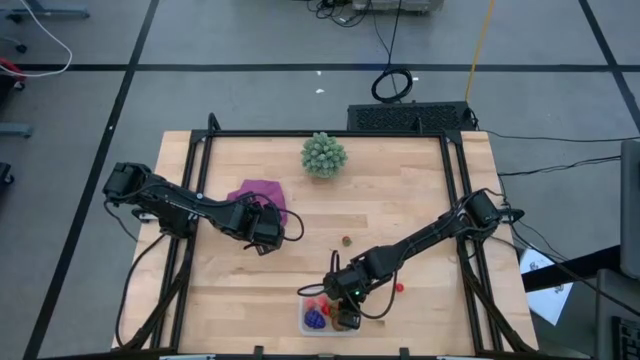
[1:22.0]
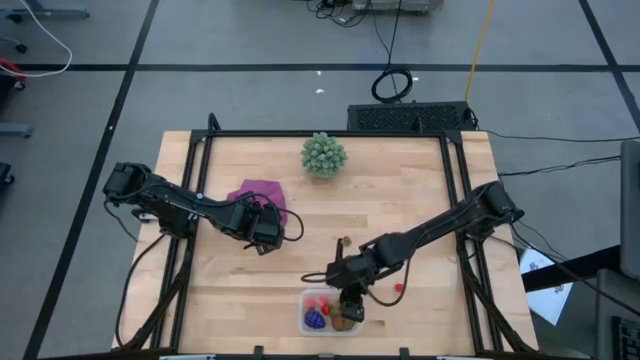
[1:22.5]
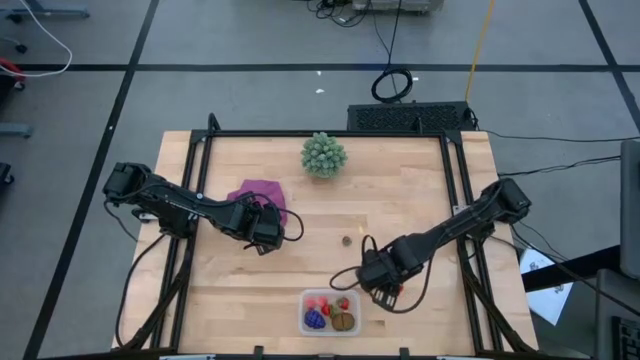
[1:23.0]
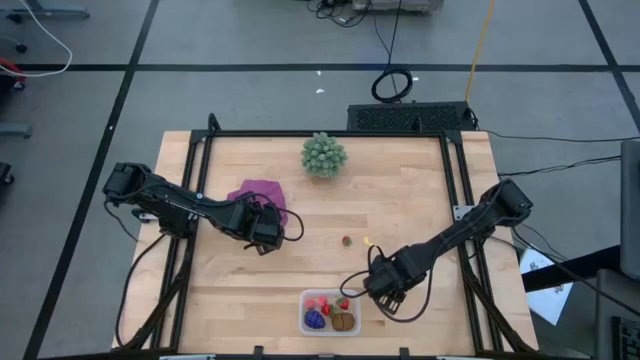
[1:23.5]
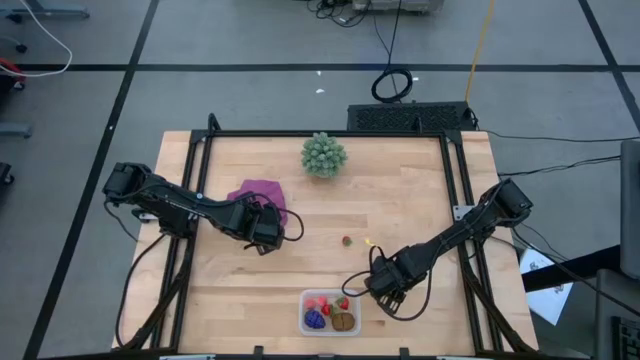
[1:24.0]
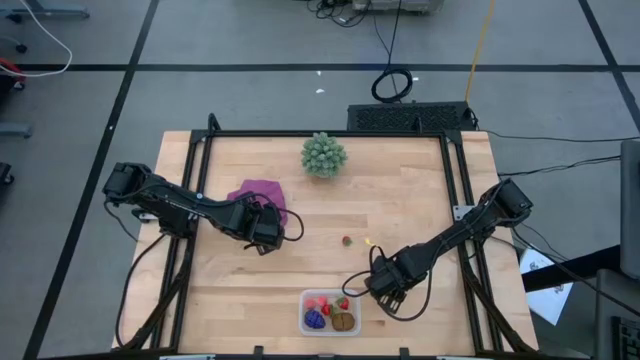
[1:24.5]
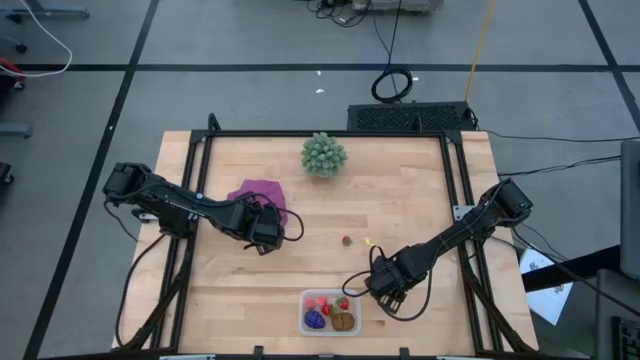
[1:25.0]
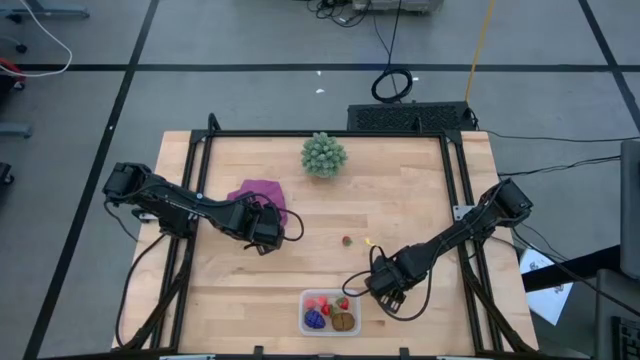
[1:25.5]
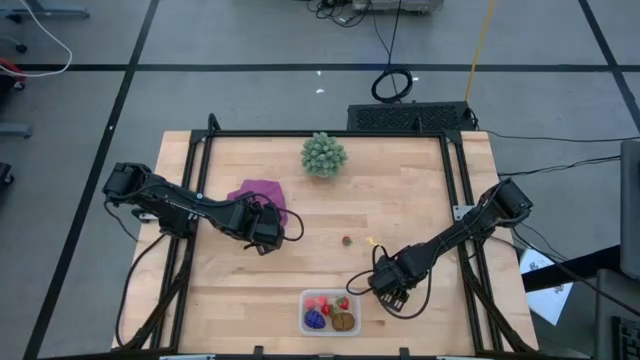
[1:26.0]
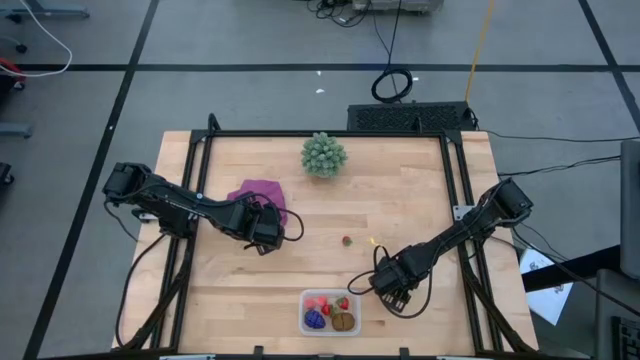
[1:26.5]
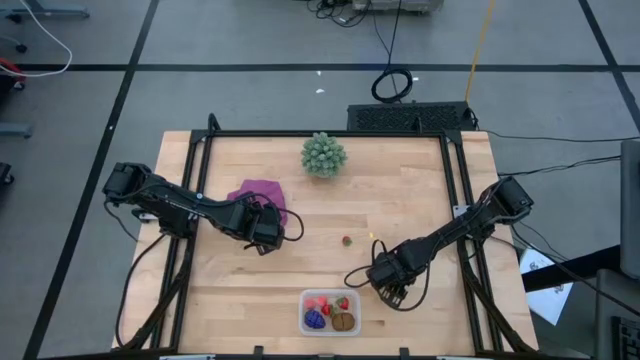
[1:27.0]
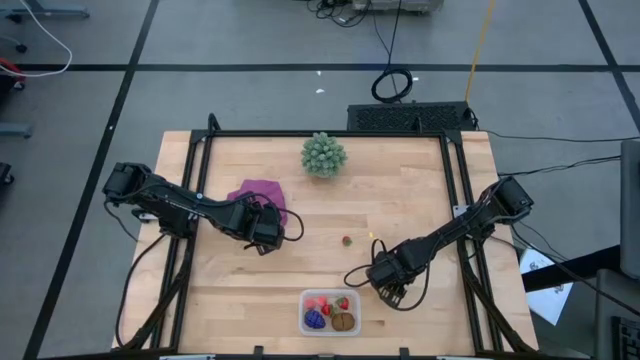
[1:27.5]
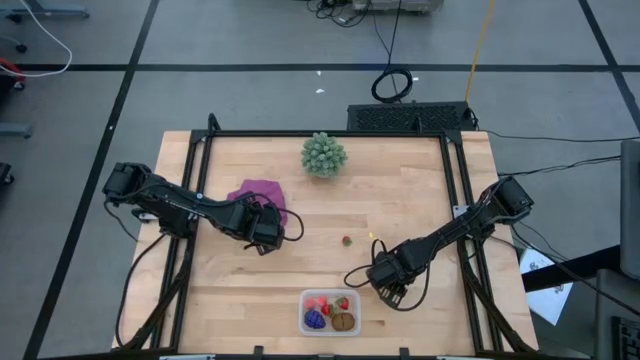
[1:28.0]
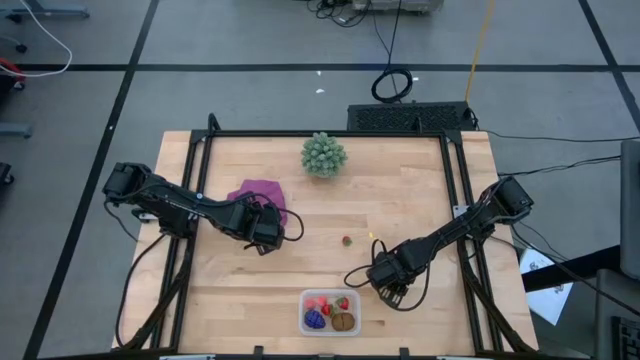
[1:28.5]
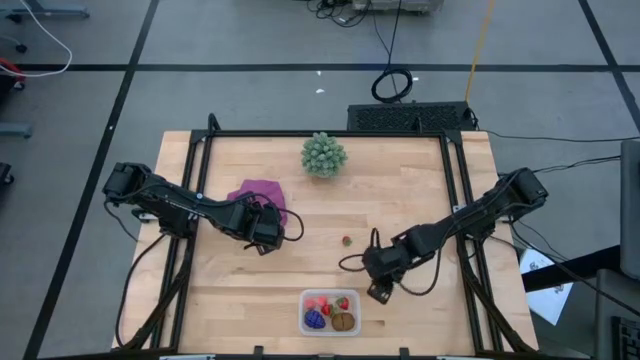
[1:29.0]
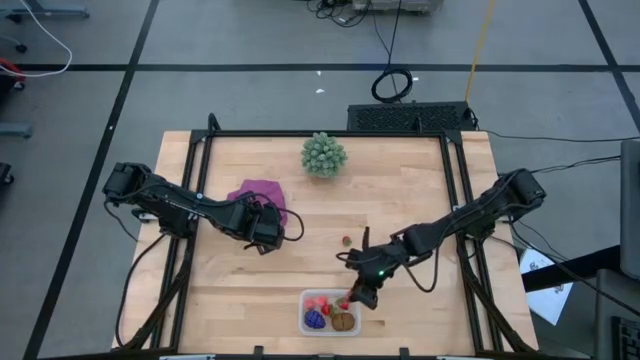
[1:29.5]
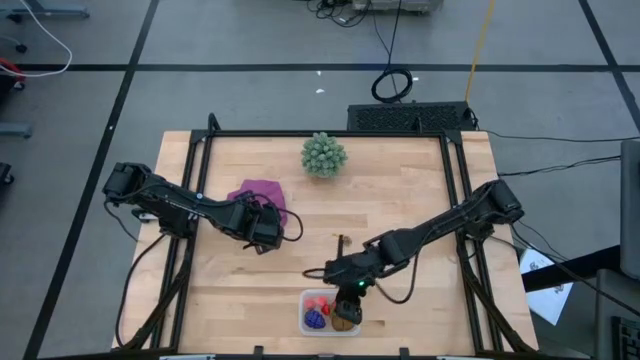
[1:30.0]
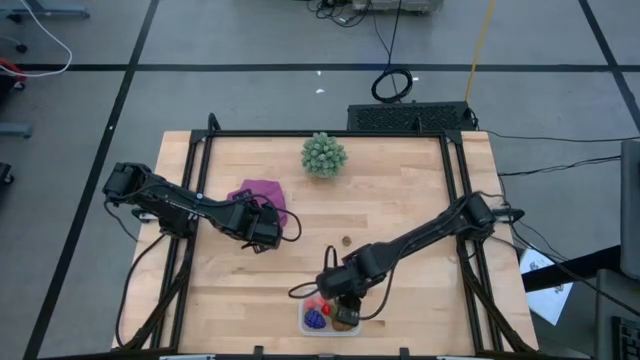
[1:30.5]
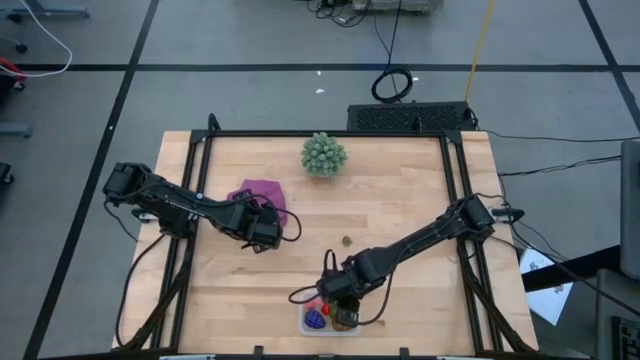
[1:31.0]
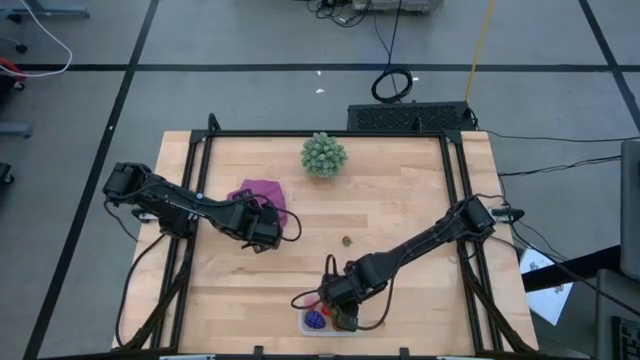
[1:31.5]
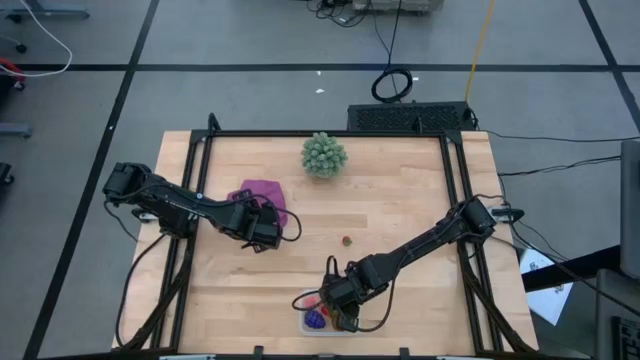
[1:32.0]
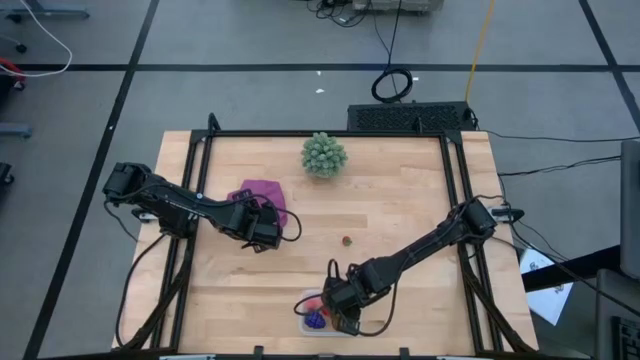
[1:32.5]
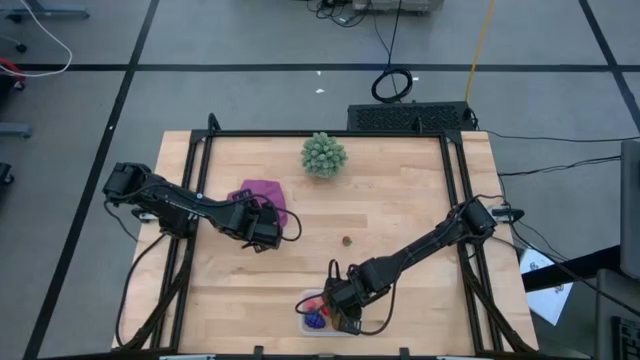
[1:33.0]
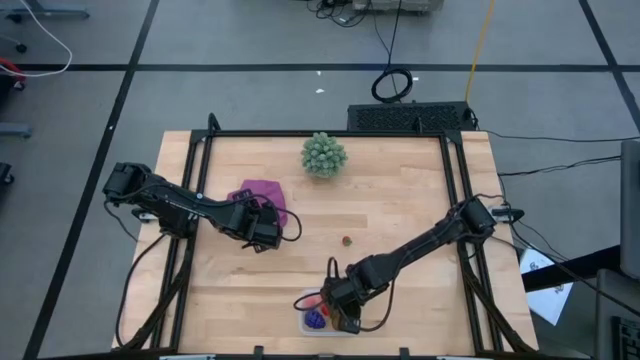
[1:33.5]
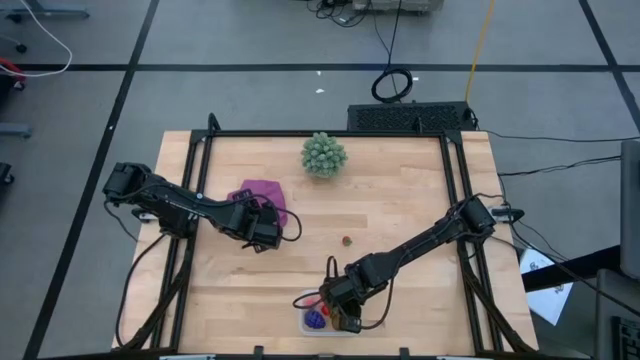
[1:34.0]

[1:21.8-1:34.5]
Task: Pick and placing Produce into tupperware
Put the red cherry into the transparent container

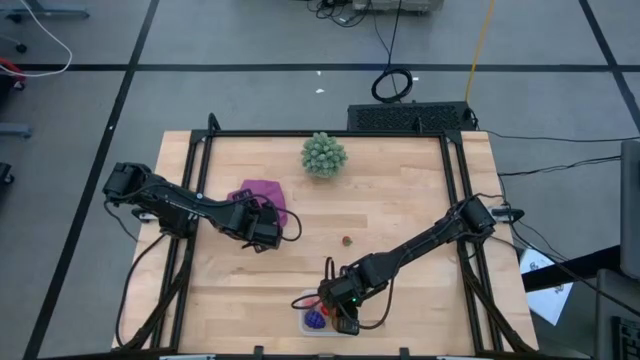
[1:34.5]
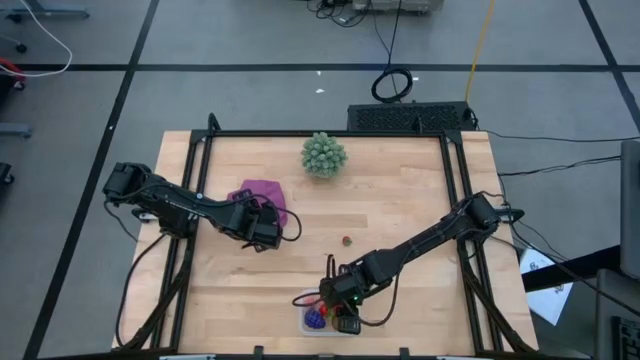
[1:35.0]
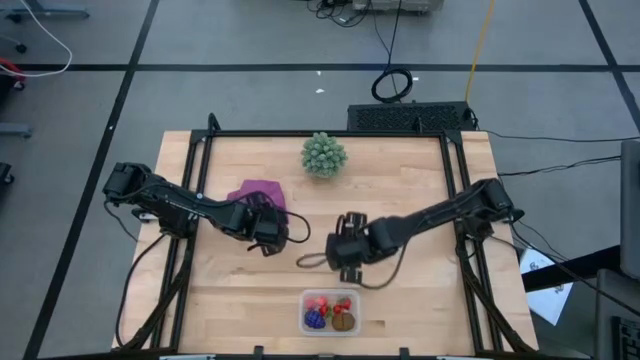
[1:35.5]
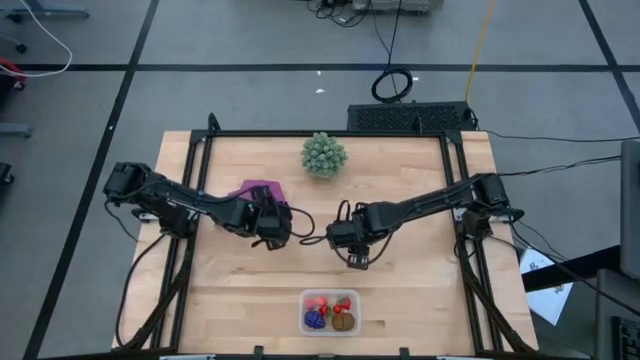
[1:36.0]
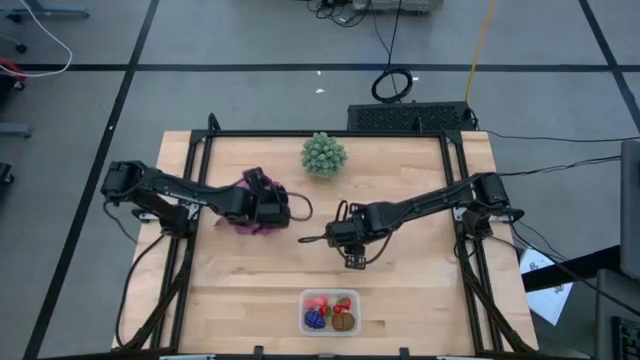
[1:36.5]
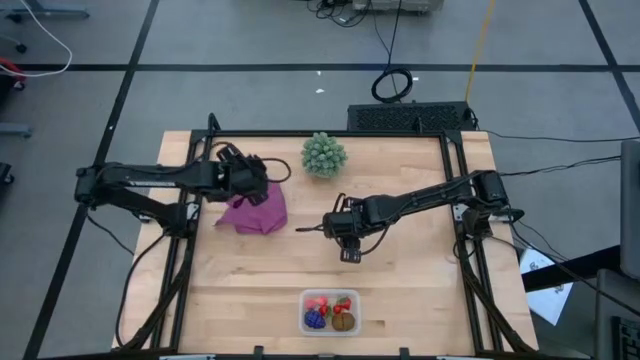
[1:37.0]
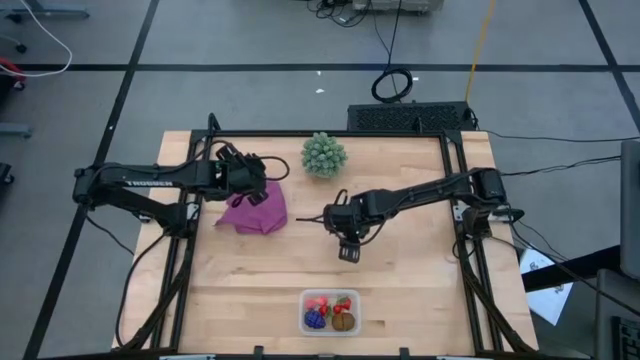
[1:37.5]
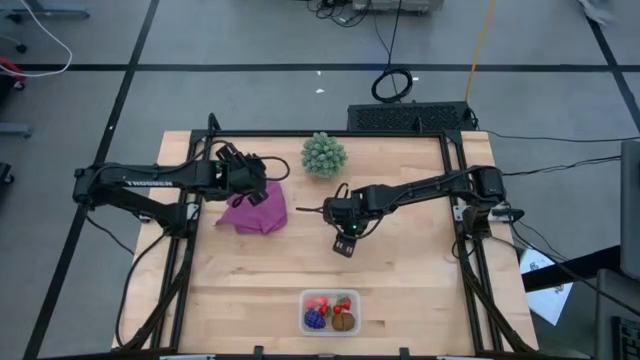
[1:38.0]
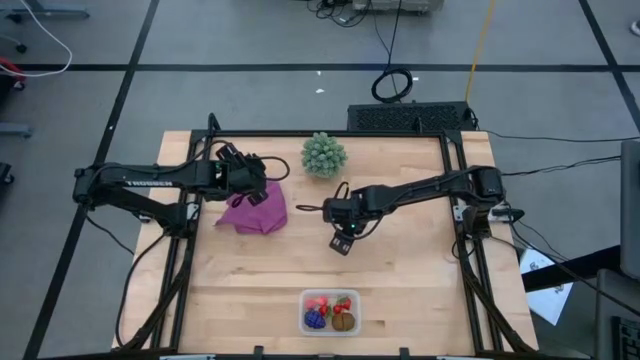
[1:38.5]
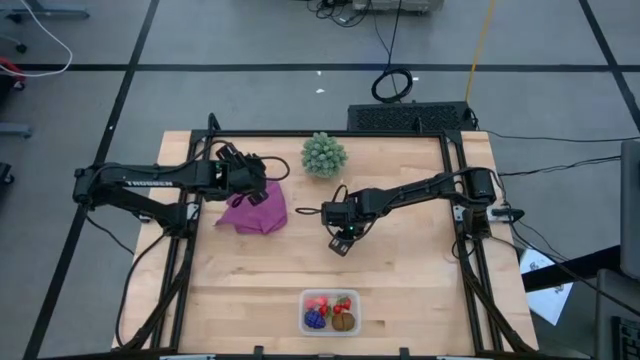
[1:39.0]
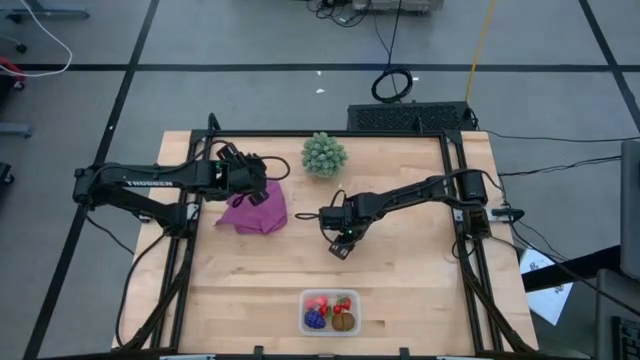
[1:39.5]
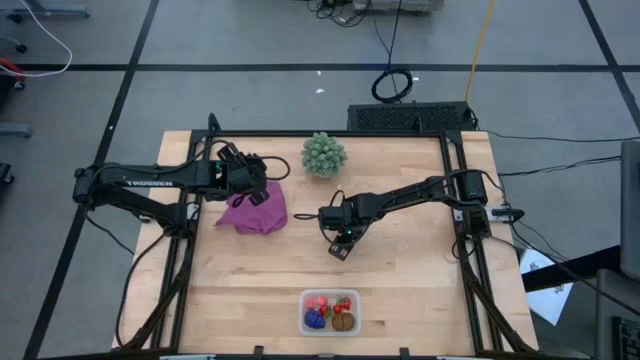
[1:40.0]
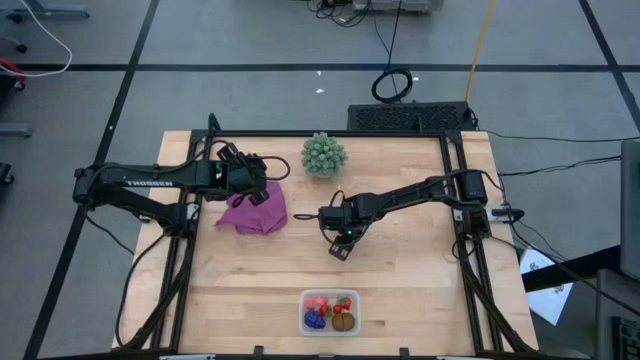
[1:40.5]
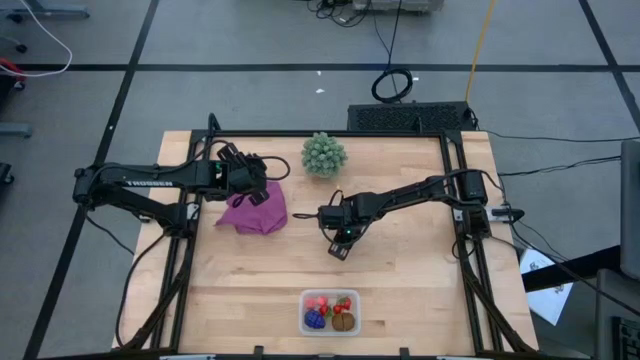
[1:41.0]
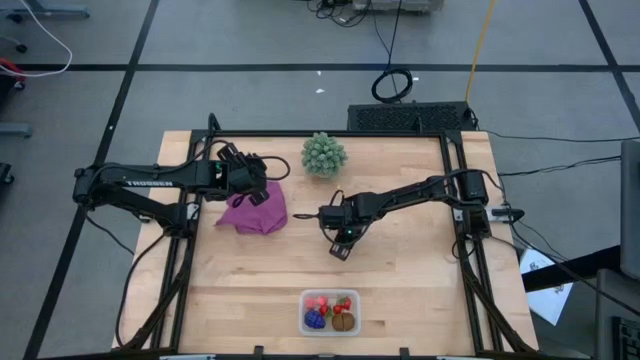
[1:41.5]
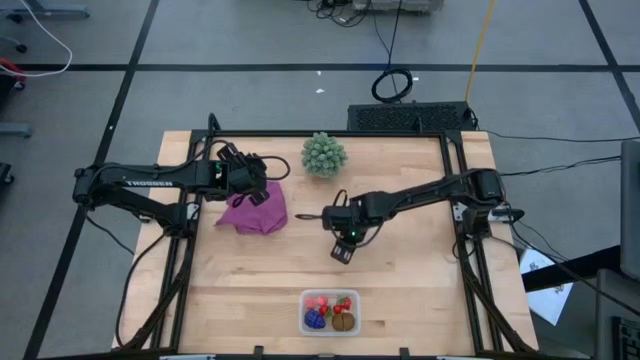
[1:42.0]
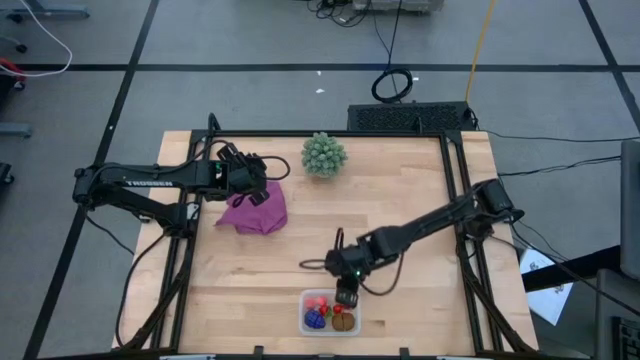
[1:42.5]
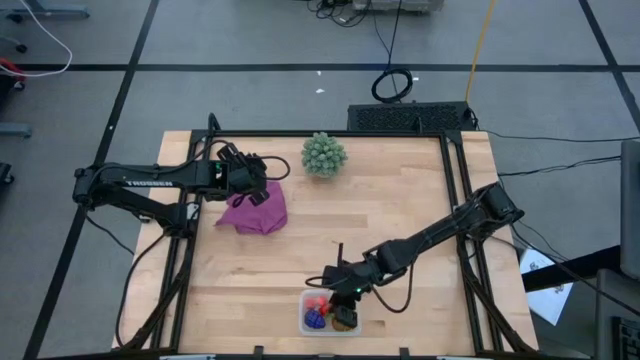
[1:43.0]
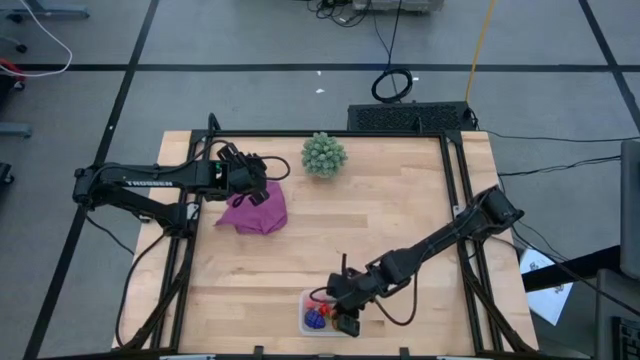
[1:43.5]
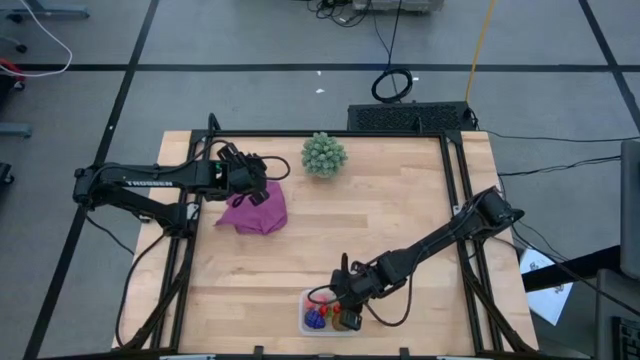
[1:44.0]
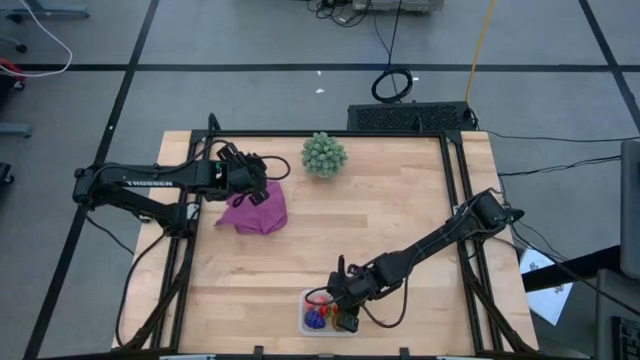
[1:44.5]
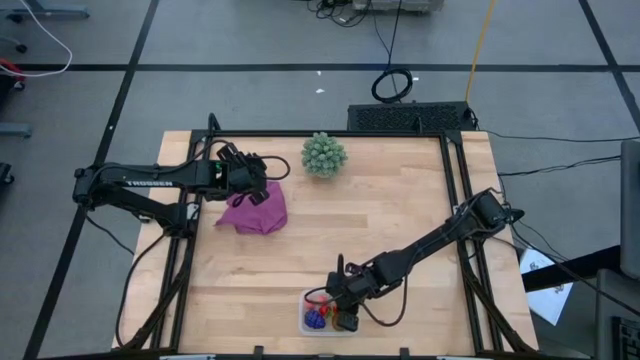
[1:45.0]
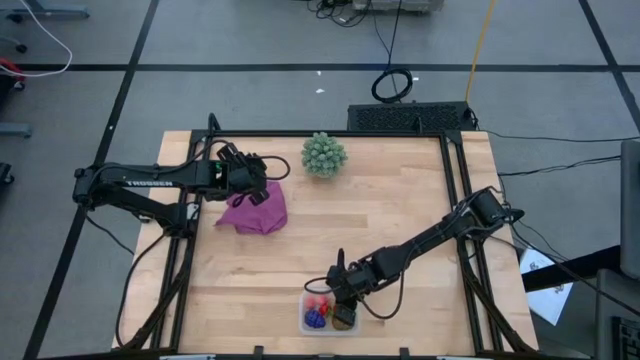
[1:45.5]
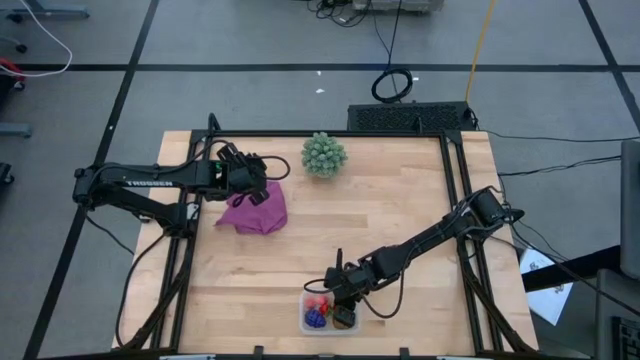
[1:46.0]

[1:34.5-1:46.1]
Put the red strawberry into the transparent container
